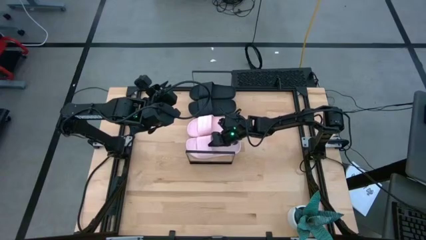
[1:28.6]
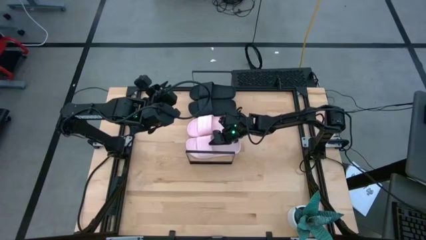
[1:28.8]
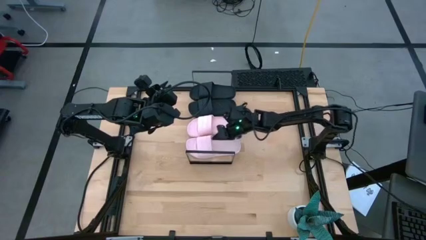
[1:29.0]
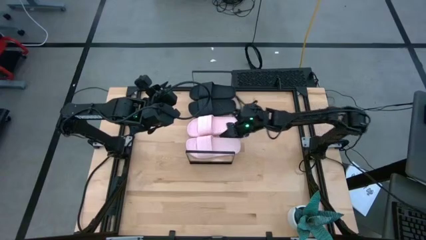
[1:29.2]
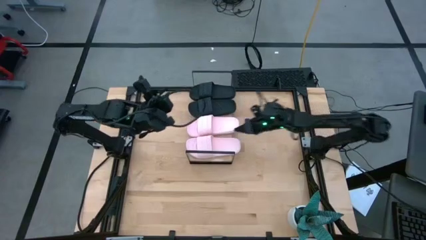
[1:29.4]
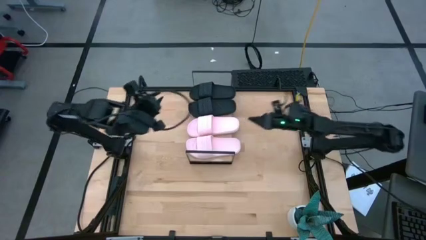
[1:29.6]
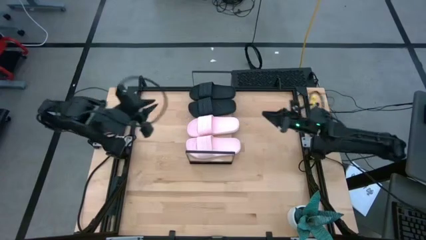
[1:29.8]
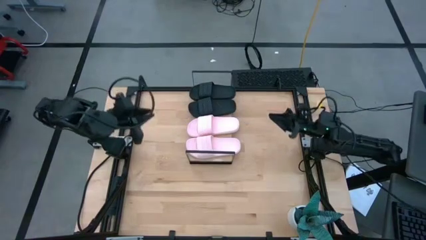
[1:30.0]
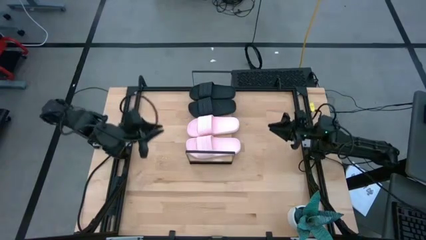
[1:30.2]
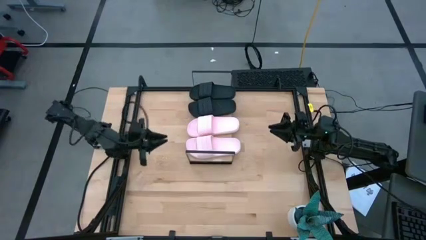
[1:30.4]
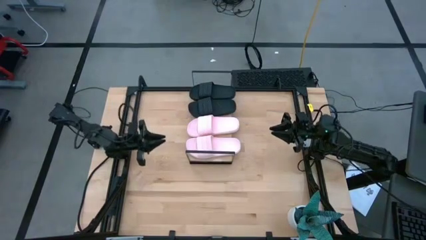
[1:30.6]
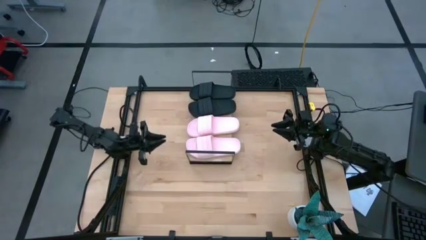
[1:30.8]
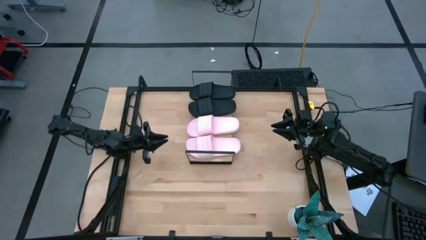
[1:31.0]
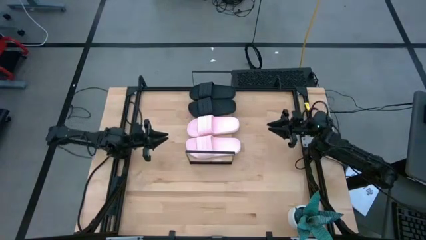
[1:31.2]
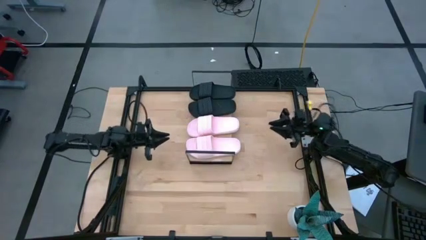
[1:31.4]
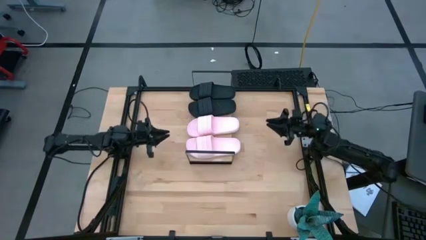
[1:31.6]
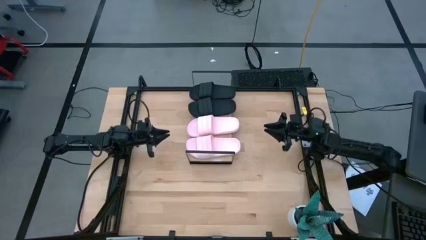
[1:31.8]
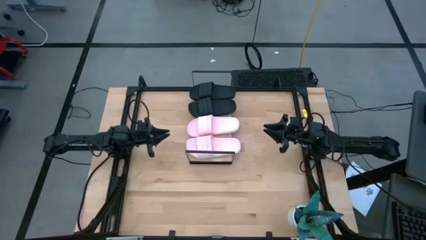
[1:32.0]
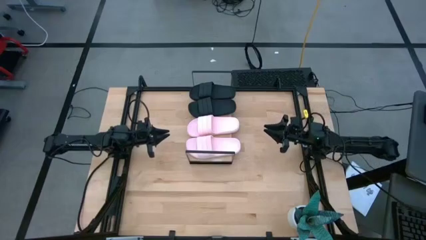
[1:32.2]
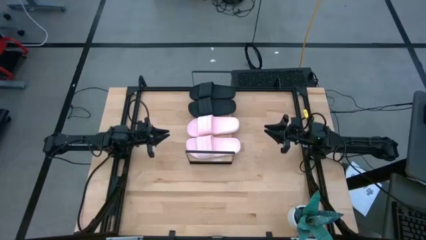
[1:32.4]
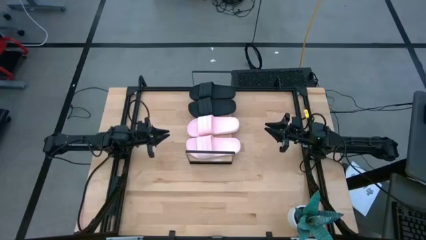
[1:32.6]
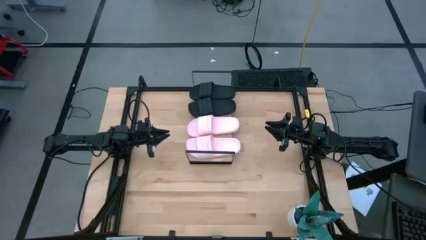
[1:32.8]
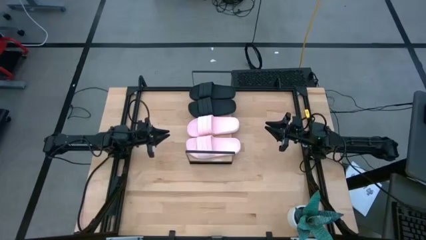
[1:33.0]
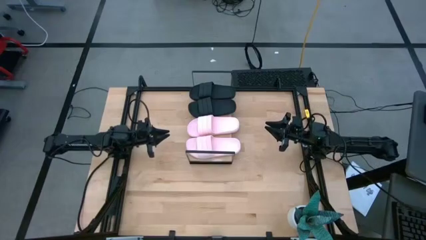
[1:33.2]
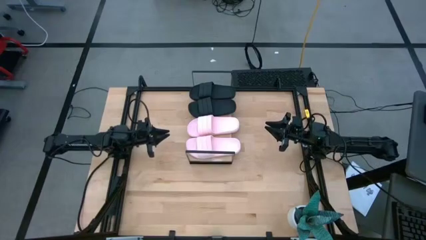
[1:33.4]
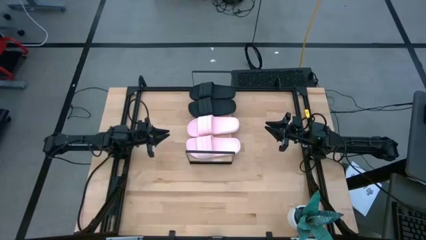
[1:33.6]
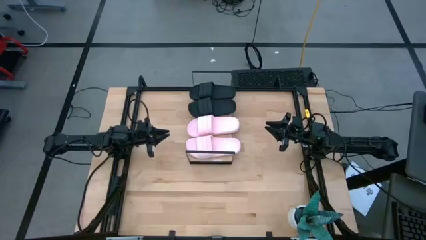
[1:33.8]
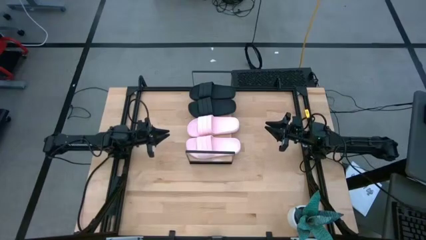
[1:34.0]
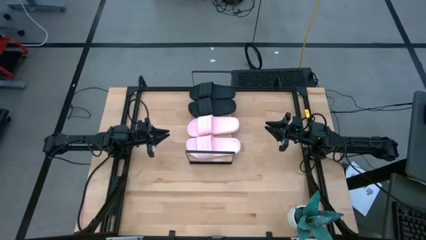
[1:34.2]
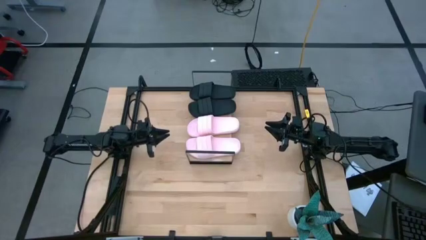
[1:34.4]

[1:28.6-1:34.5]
Task: Pick and place slides into the shelf
Return to Home Position

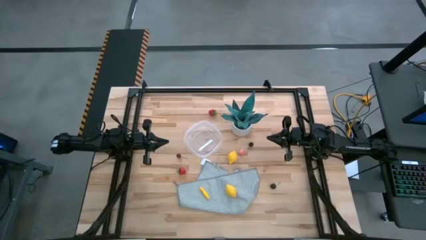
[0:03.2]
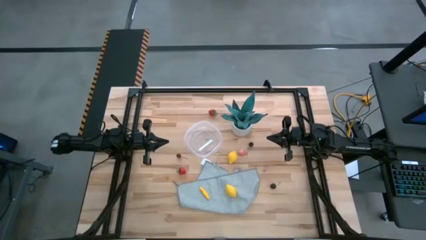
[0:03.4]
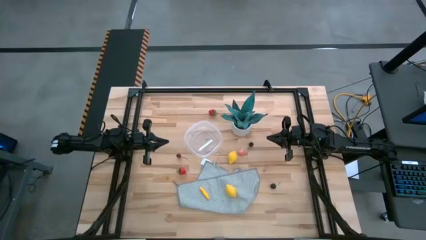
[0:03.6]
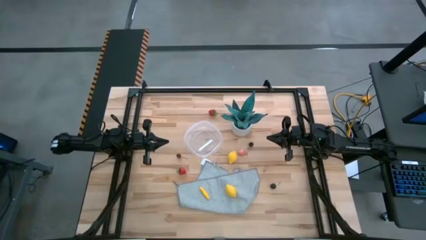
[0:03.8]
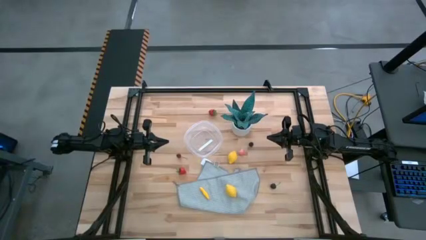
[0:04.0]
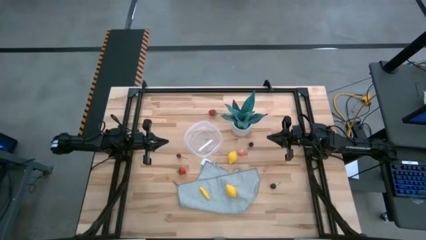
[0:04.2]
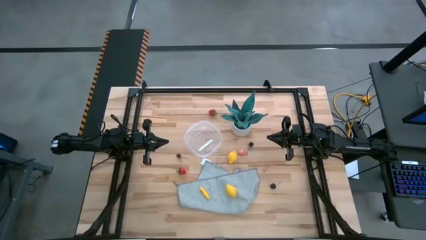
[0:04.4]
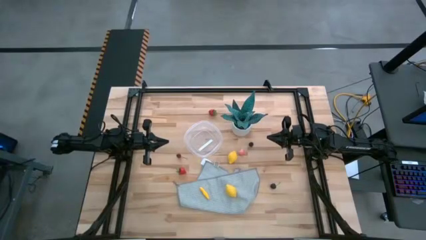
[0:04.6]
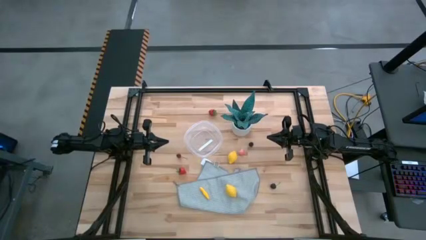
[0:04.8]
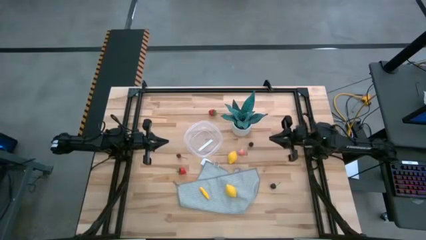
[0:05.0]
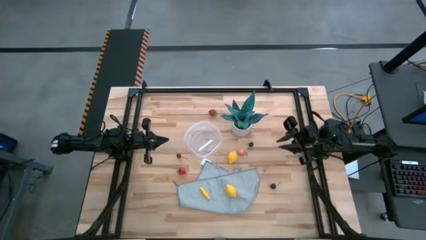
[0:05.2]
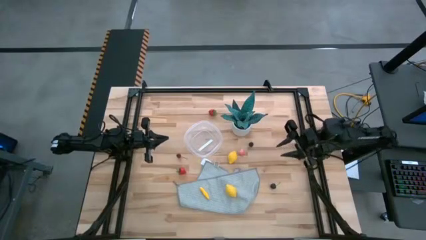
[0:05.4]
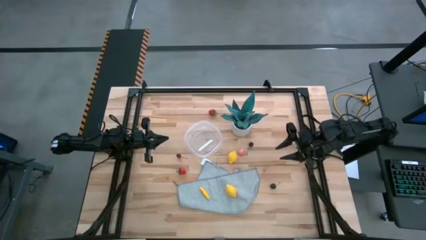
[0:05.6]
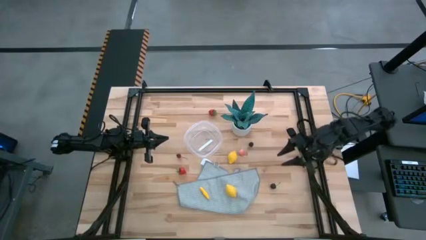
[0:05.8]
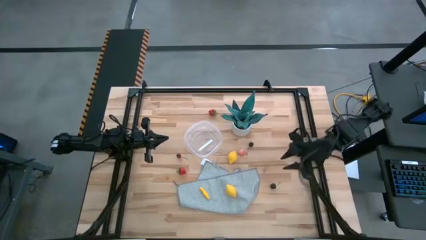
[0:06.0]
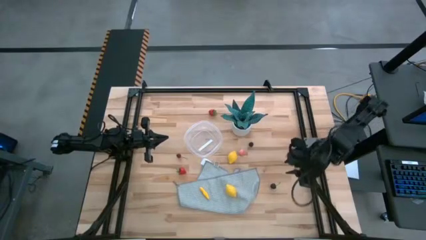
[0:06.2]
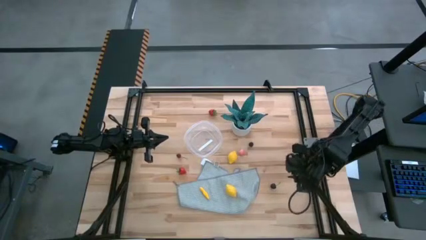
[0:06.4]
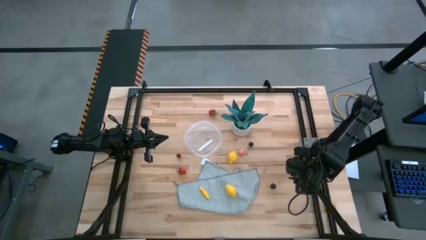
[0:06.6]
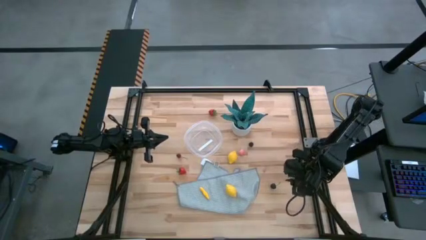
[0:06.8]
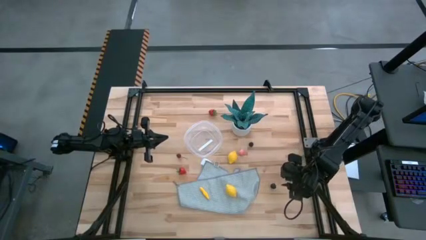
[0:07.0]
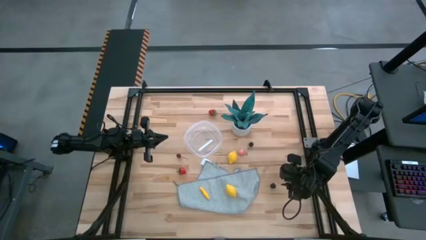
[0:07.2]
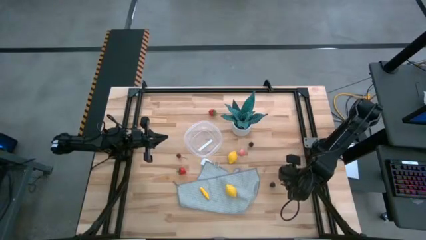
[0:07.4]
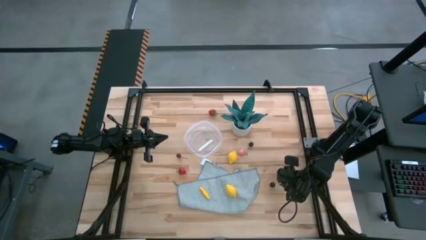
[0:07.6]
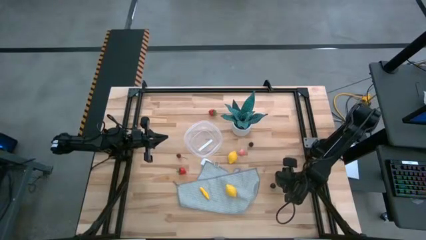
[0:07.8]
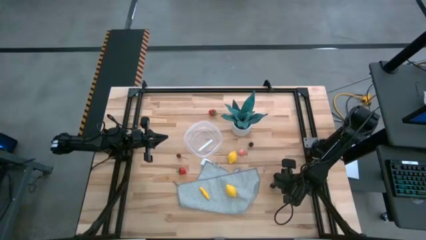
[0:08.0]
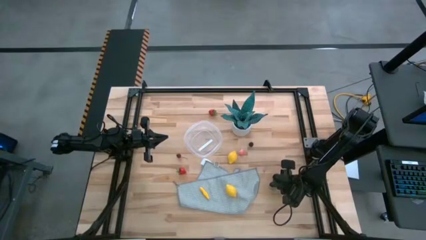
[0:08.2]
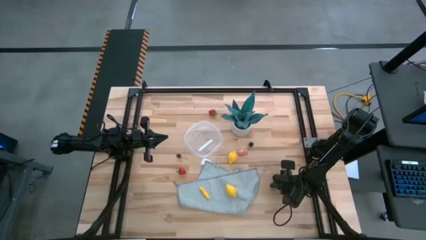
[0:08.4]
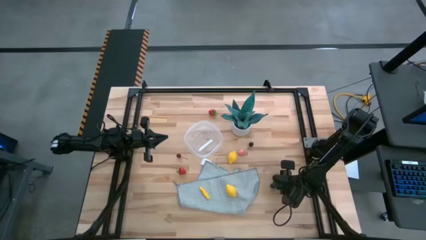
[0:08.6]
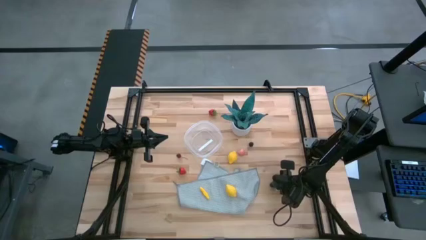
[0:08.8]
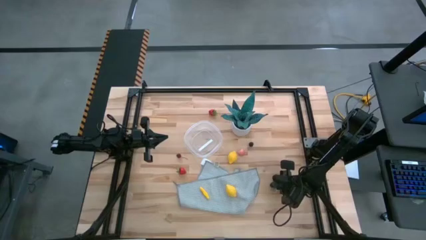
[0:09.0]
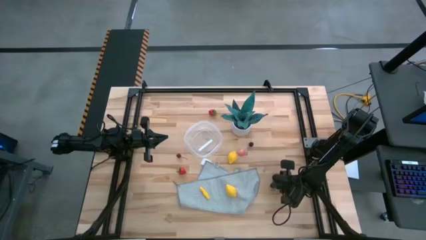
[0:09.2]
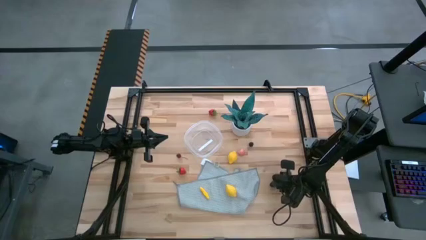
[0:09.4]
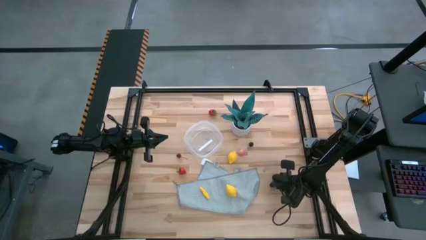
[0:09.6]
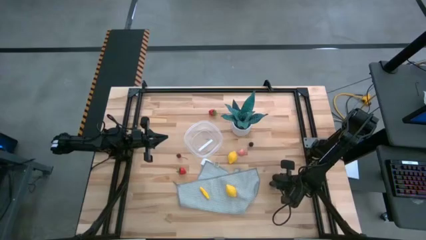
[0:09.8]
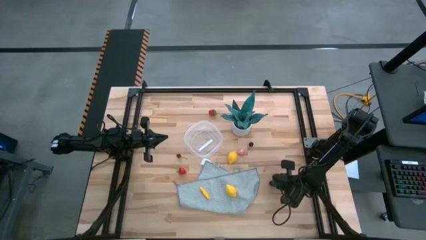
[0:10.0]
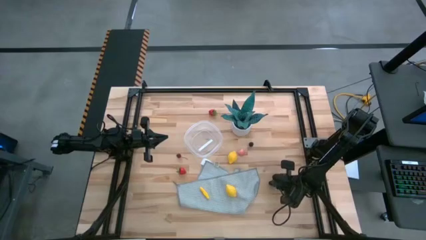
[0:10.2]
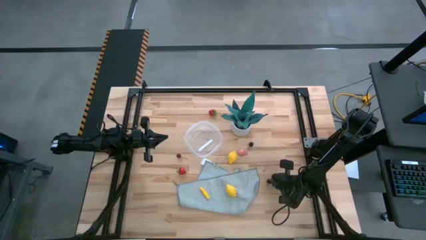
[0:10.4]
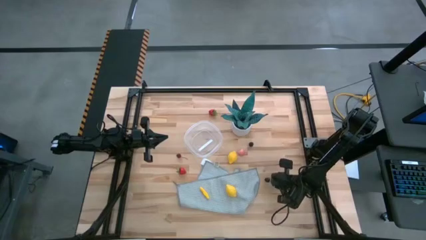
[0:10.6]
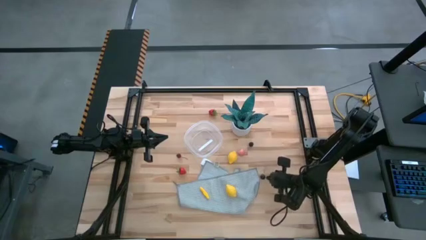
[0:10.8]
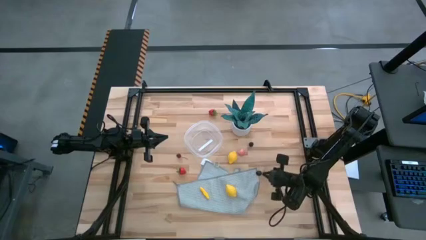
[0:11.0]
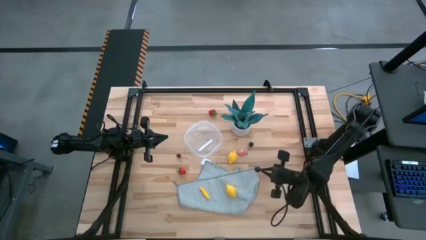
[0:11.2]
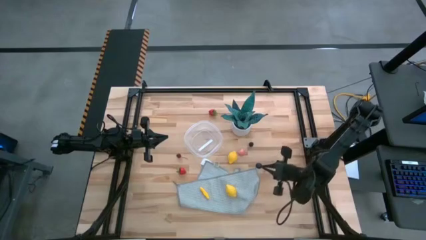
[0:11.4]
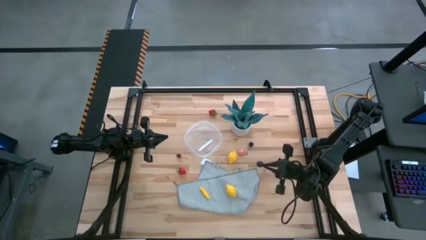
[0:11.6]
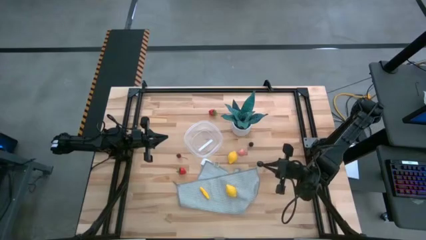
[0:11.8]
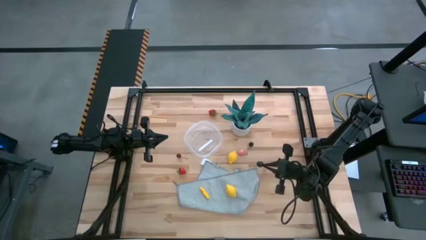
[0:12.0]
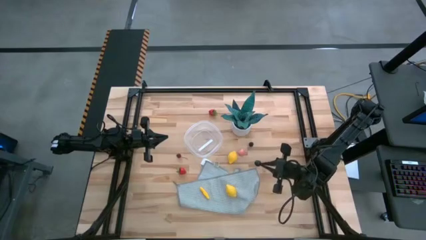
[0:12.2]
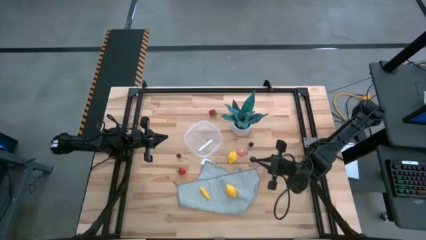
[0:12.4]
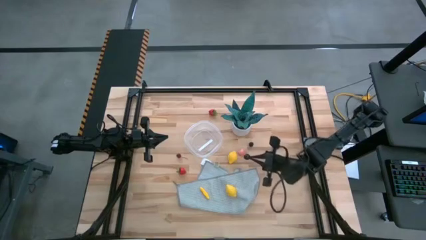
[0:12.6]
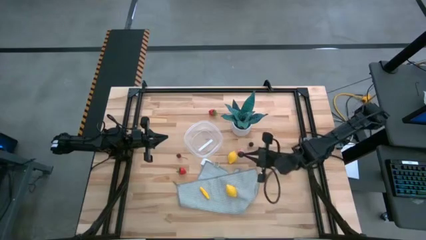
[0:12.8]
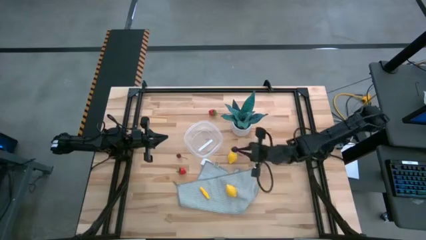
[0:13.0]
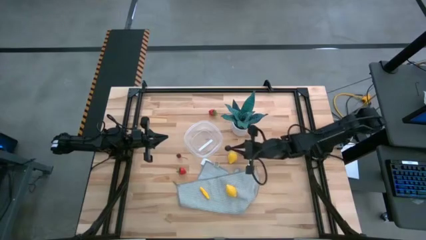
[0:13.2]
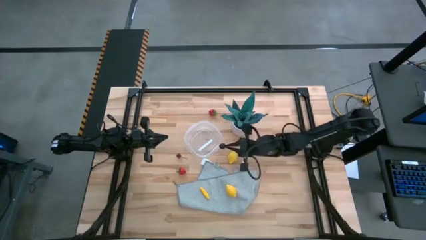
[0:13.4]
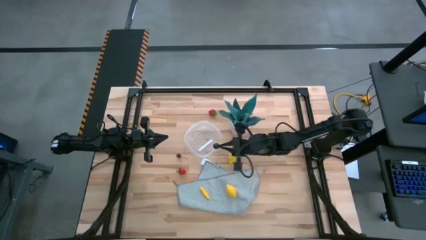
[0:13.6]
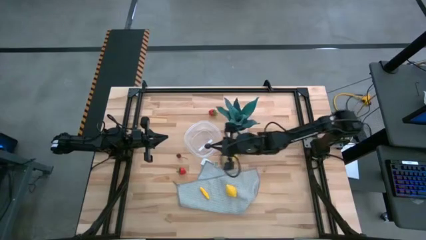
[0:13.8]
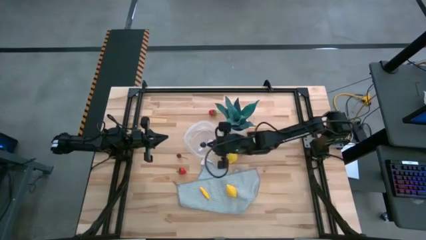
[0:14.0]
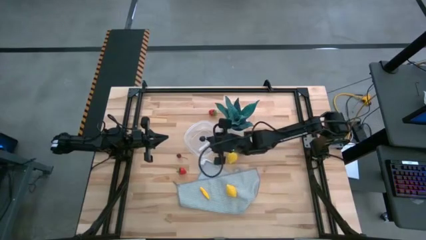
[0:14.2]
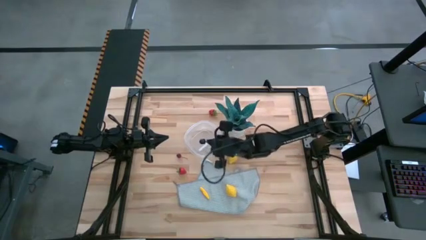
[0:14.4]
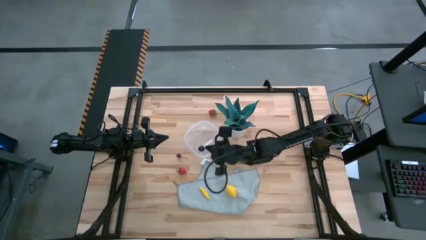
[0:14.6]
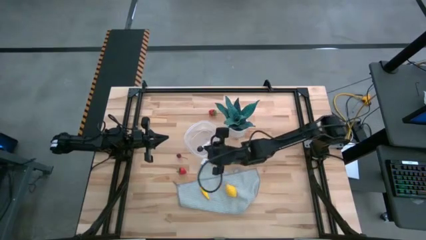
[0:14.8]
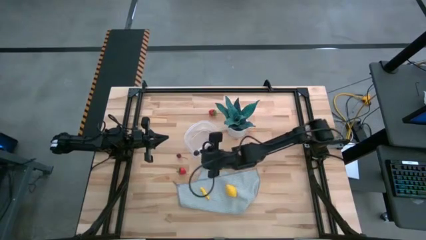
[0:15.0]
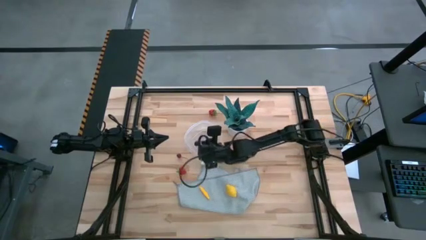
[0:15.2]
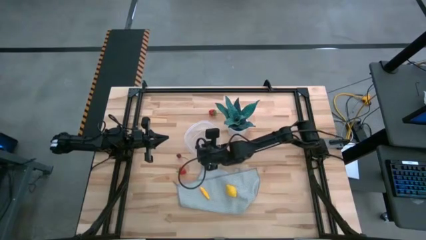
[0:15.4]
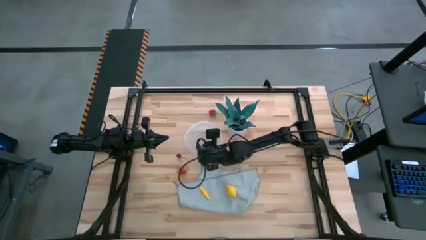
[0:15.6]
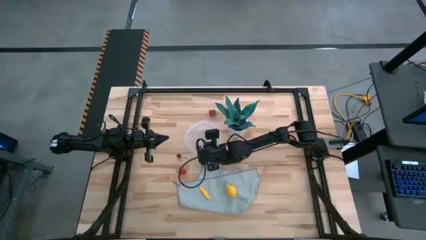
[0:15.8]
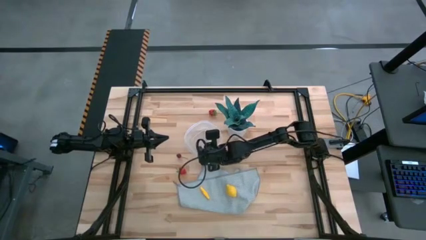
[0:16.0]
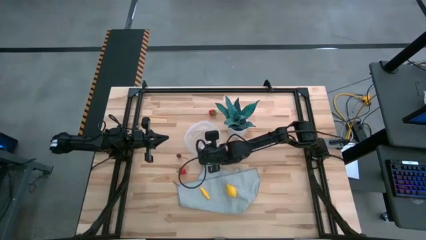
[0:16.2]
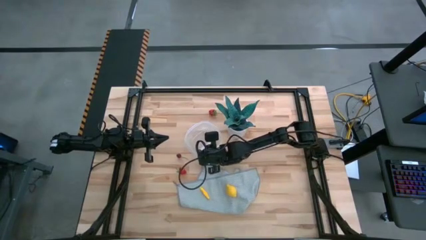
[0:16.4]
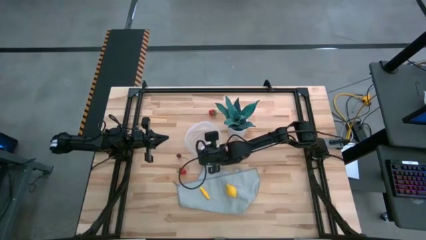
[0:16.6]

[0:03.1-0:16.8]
Task: Pick and placing Produce into tupperware
Put the black cherry into the container
